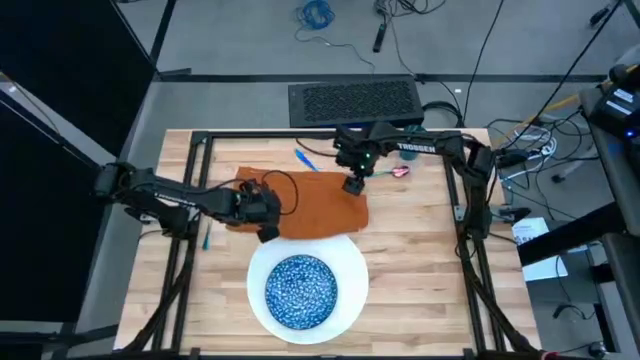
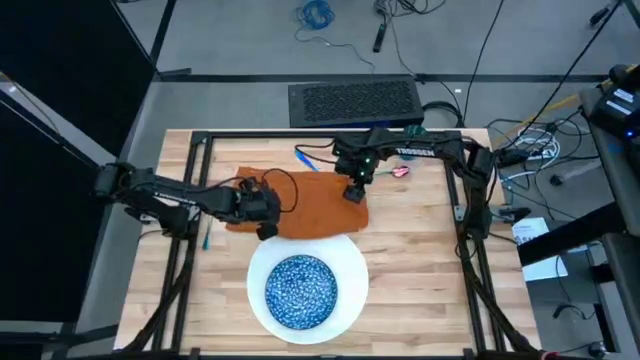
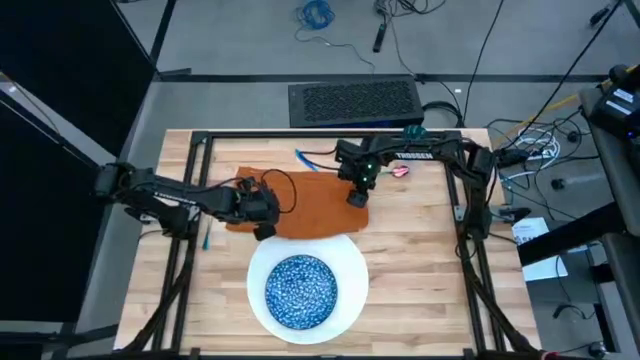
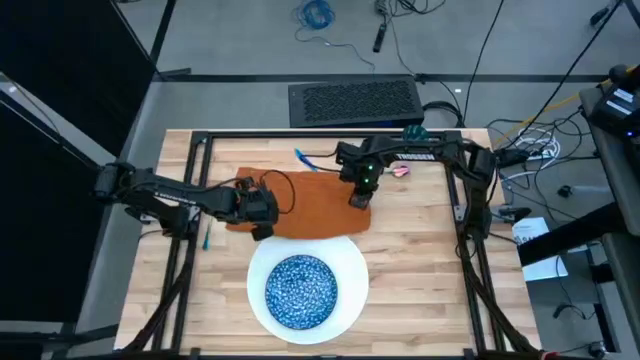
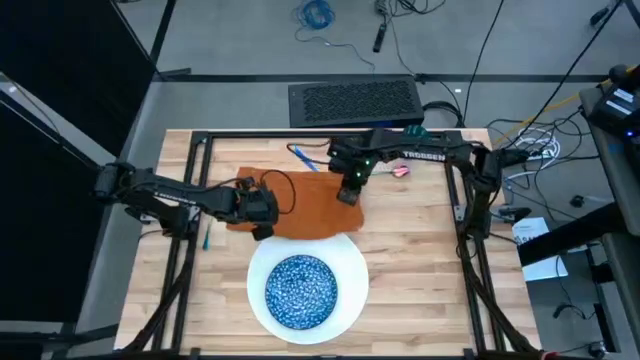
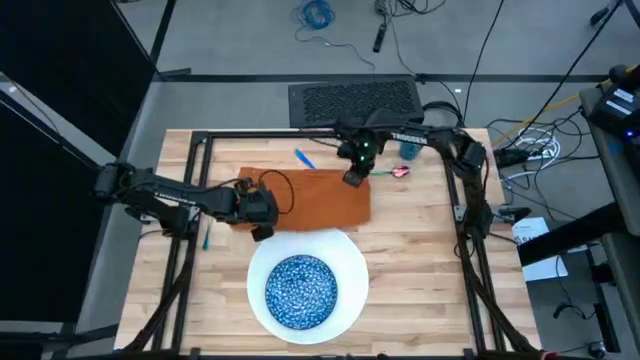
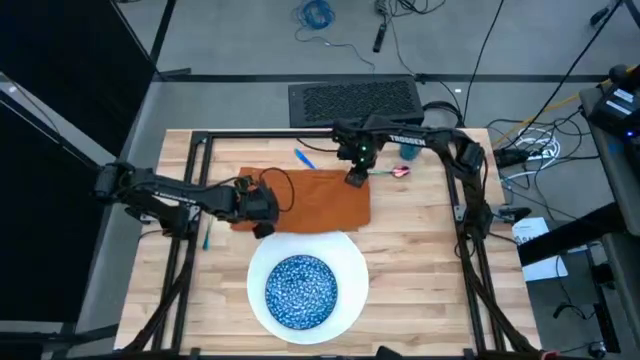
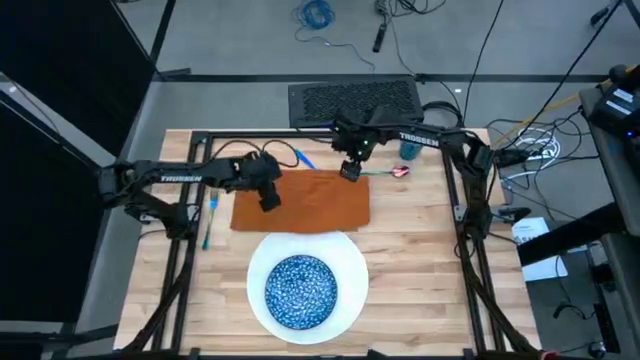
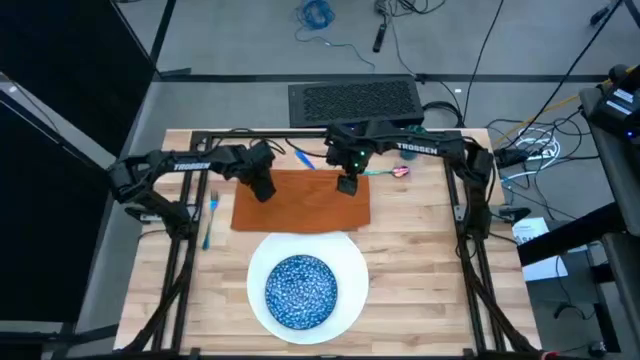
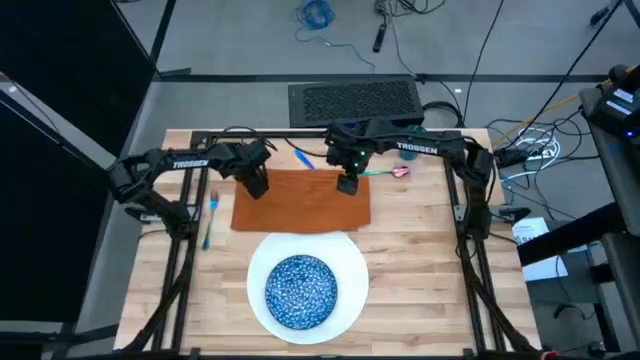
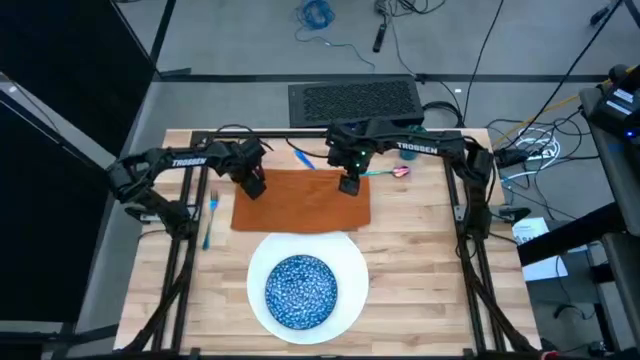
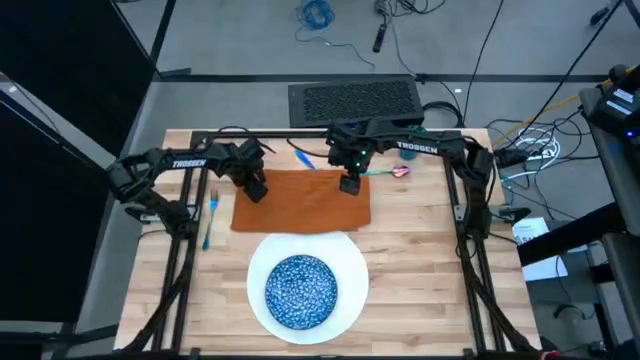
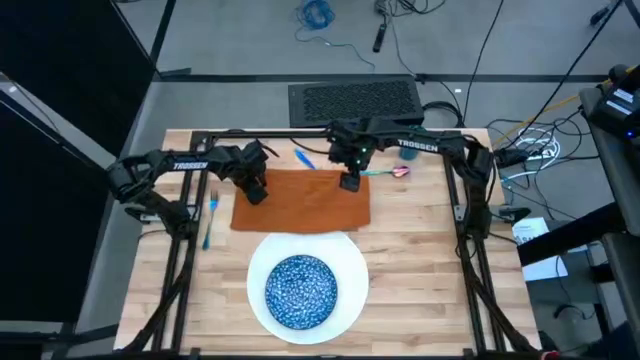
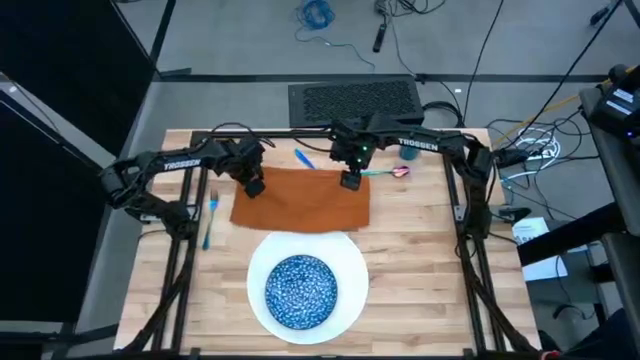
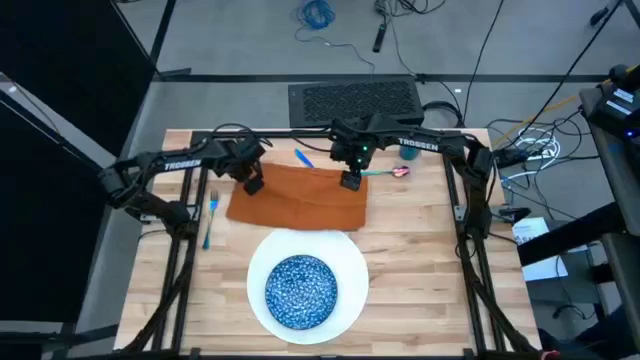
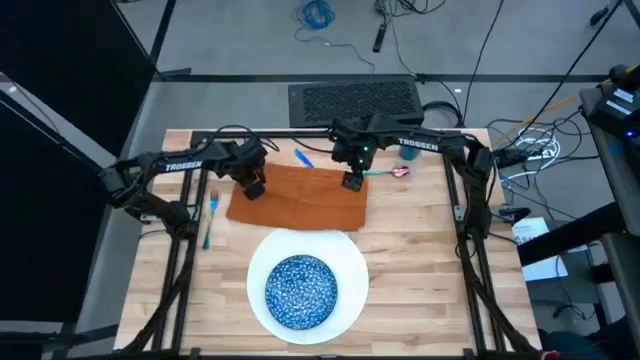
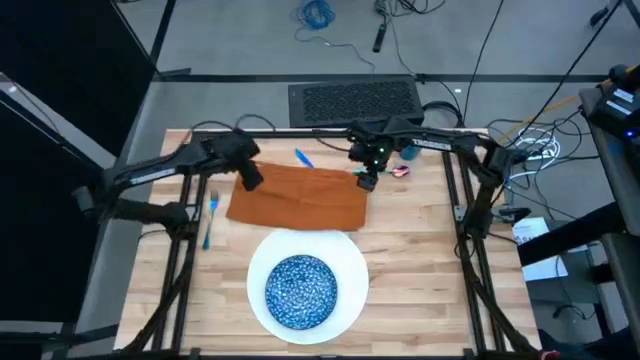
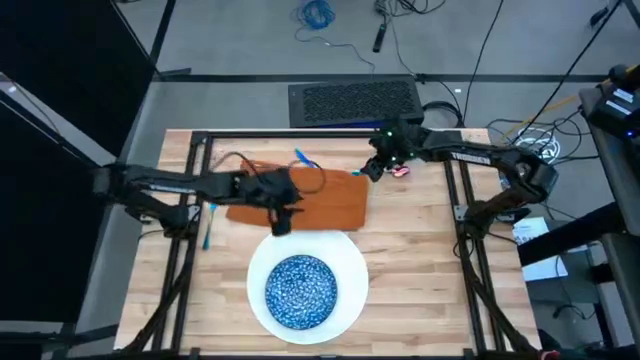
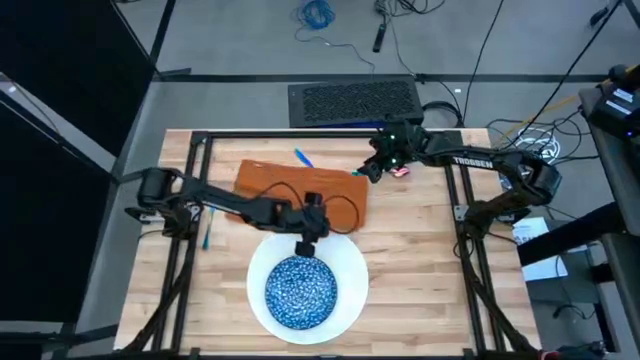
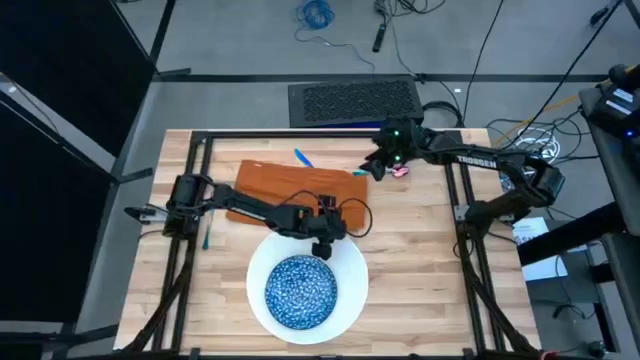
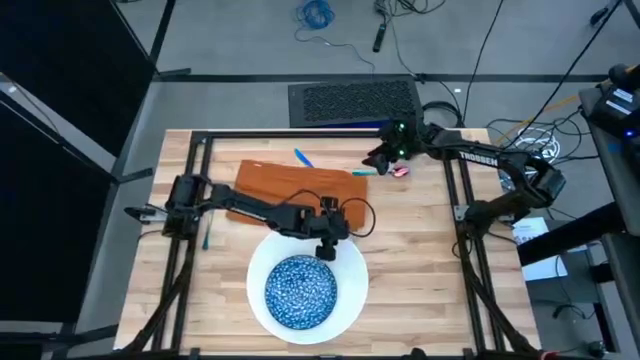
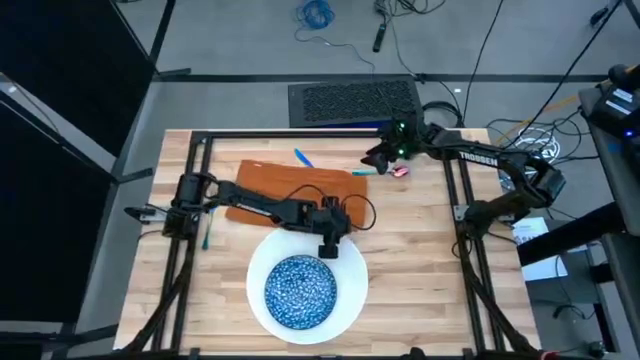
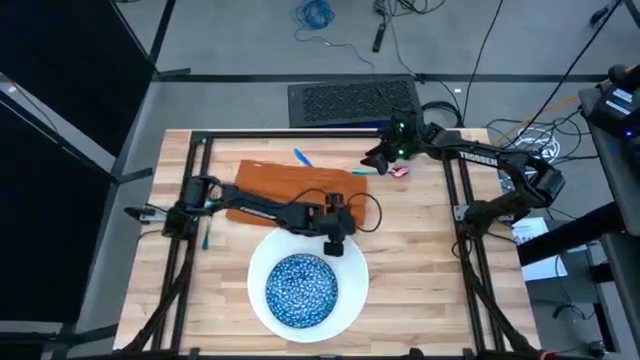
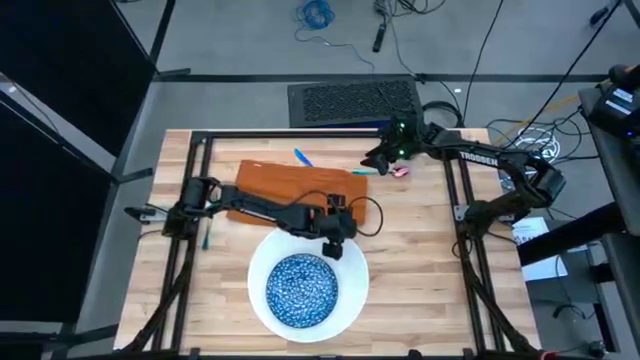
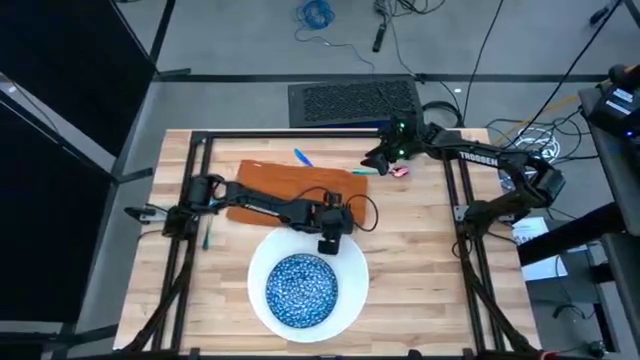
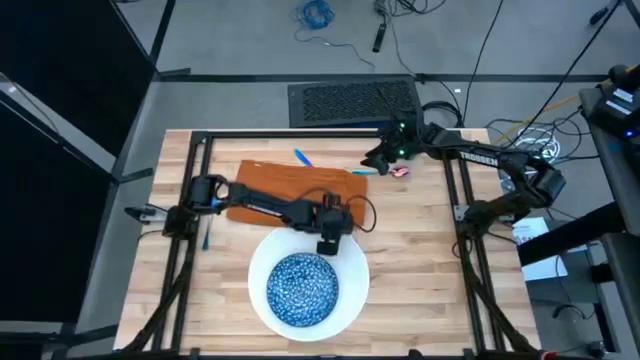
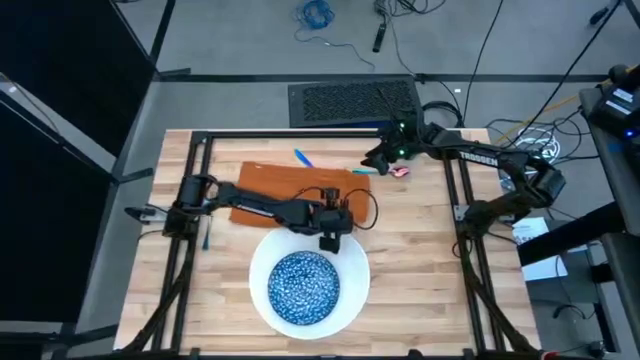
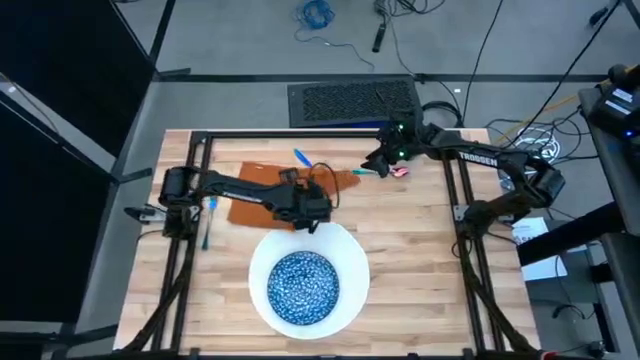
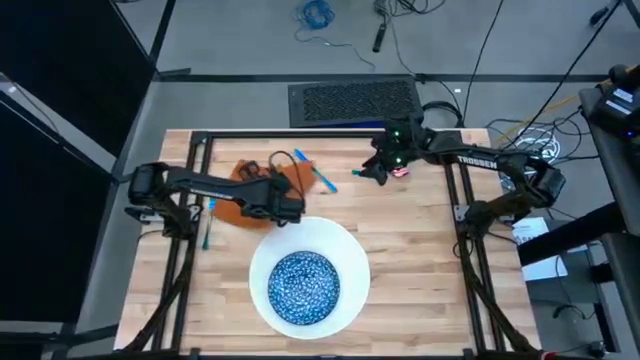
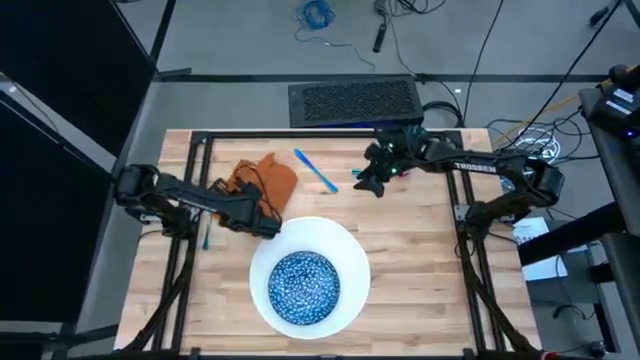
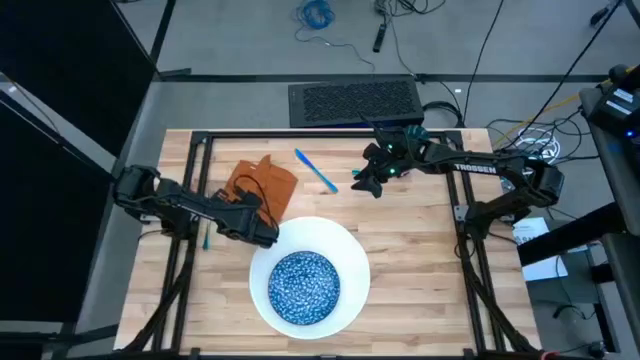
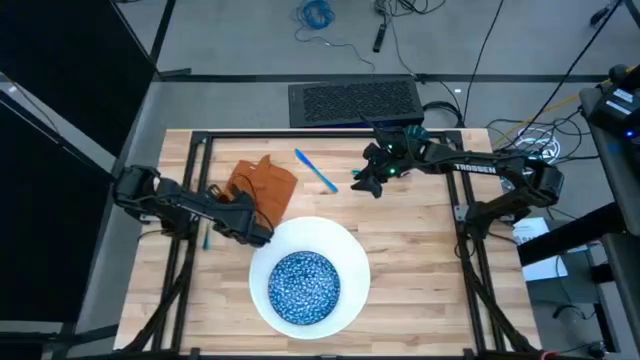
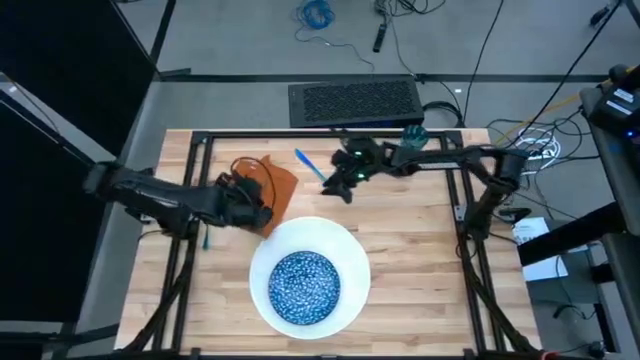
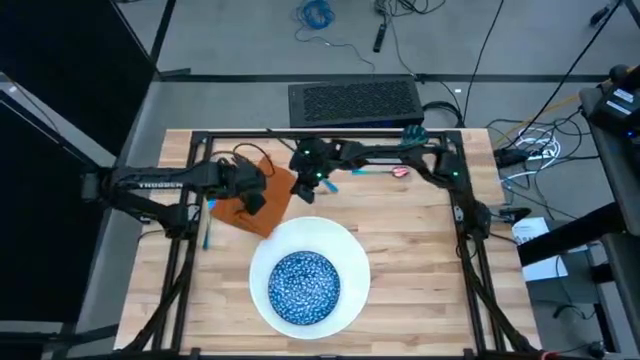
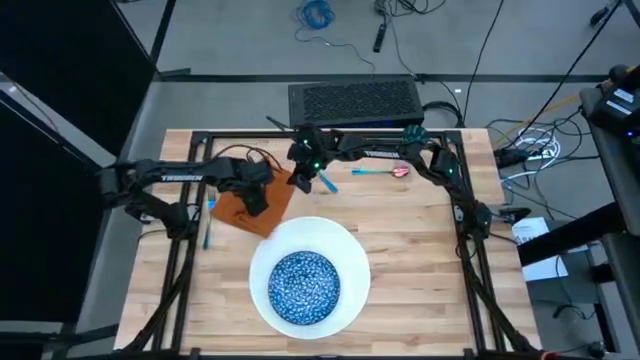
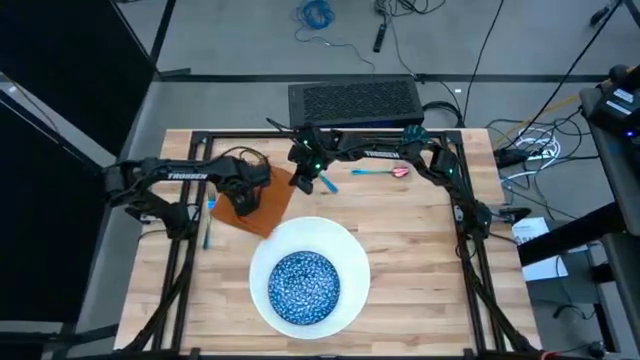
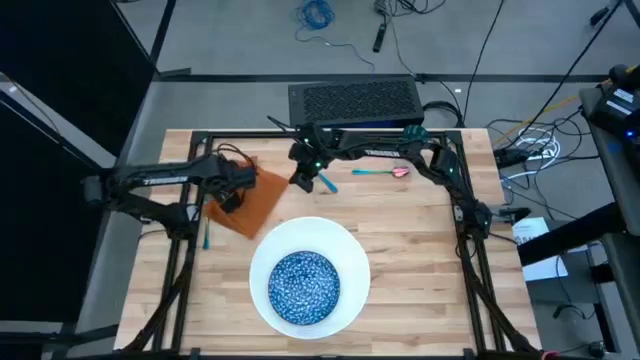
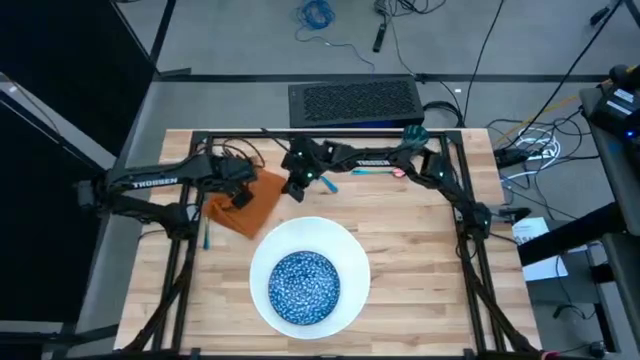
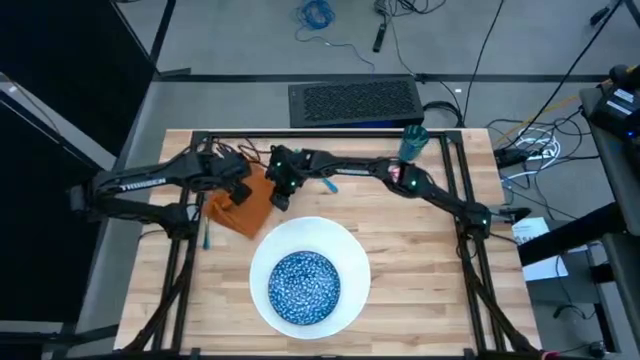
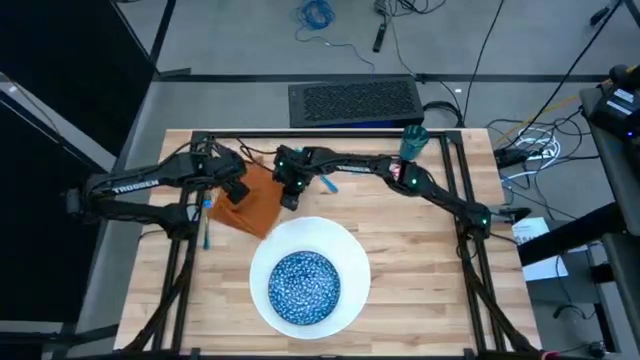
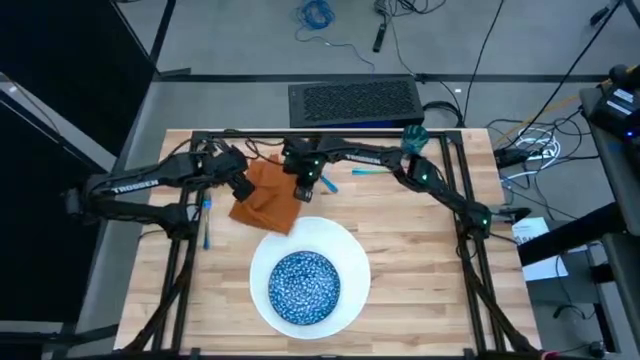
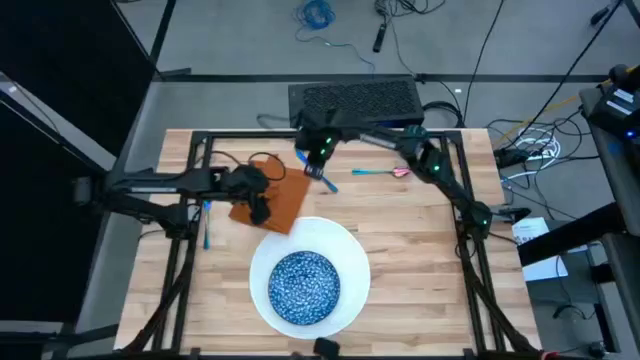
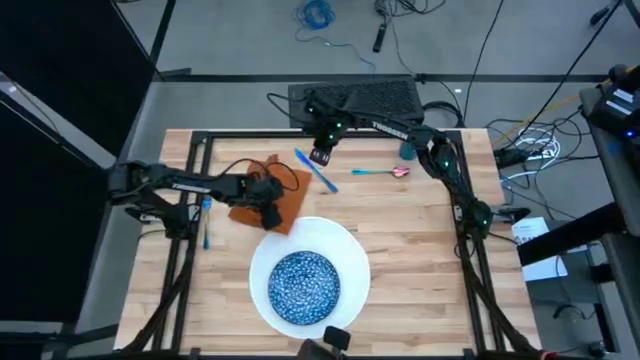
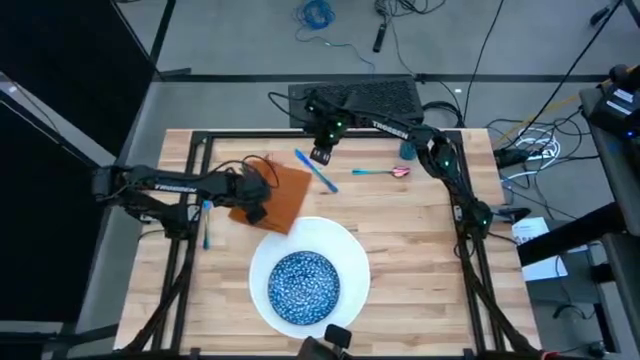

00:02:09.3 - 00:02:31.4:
Task: Set table place
Fold the orange table napkin
